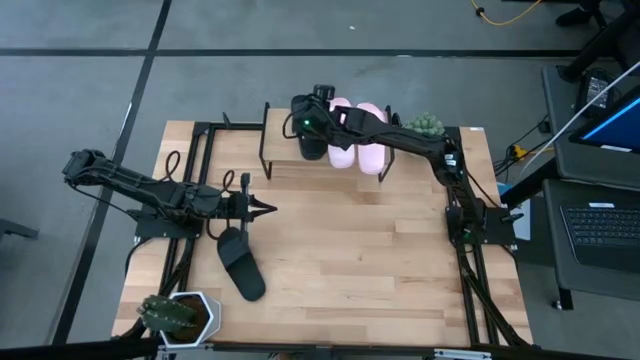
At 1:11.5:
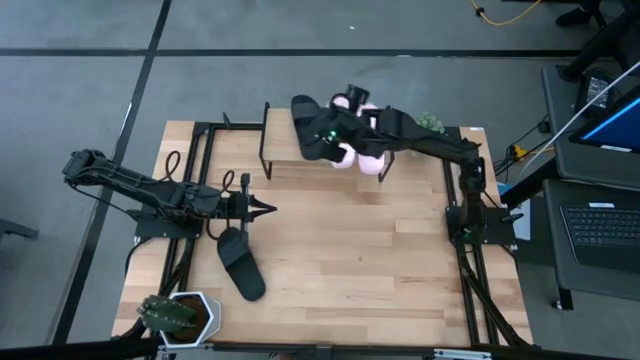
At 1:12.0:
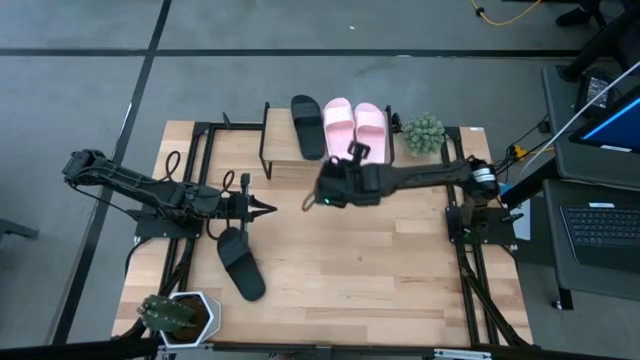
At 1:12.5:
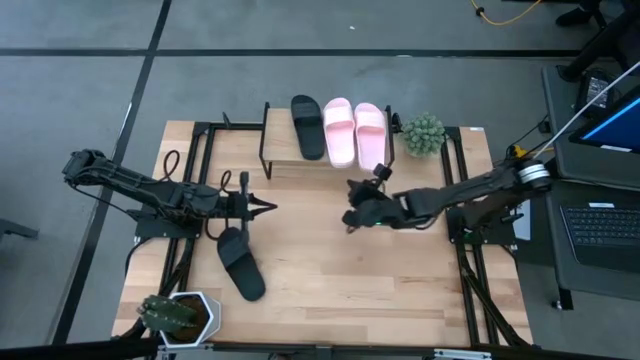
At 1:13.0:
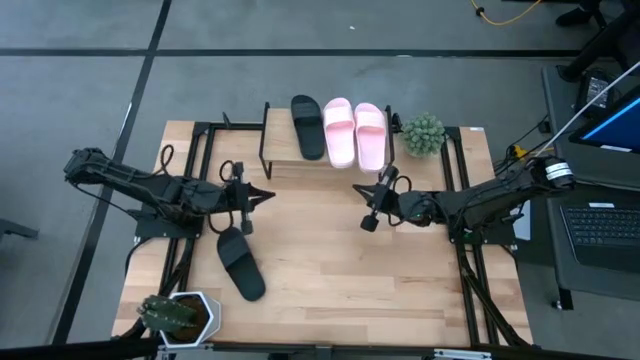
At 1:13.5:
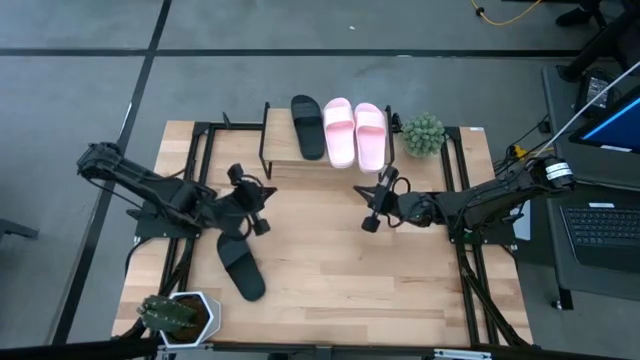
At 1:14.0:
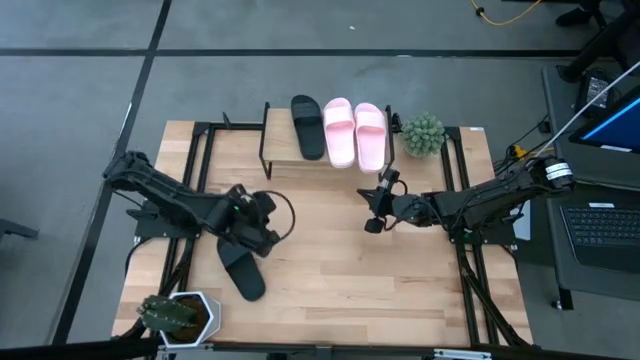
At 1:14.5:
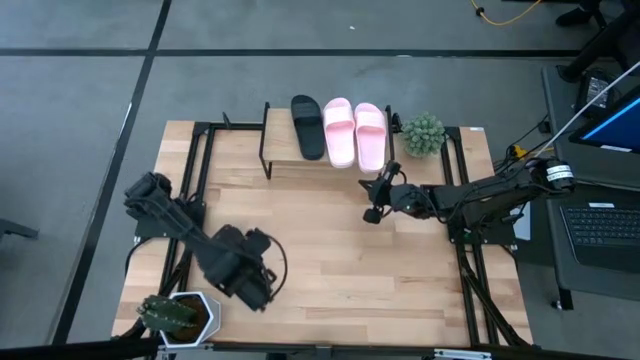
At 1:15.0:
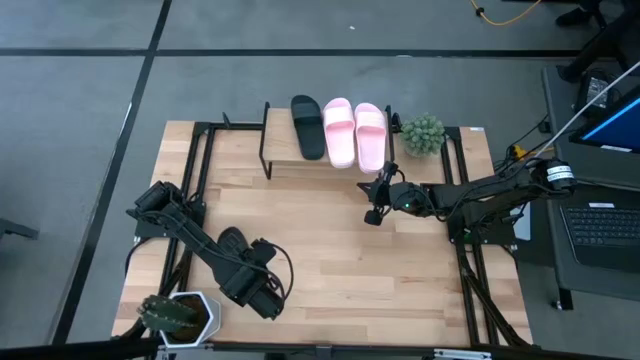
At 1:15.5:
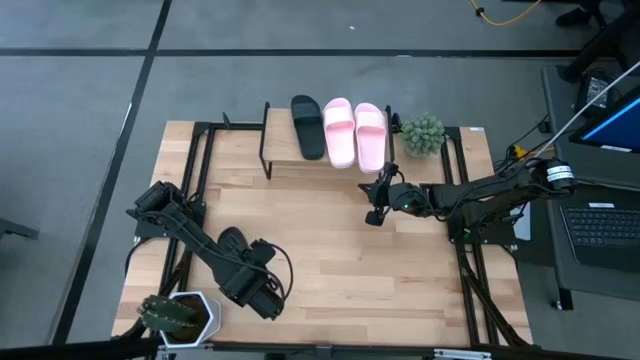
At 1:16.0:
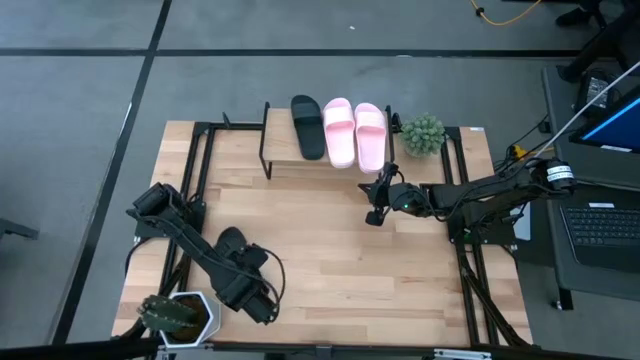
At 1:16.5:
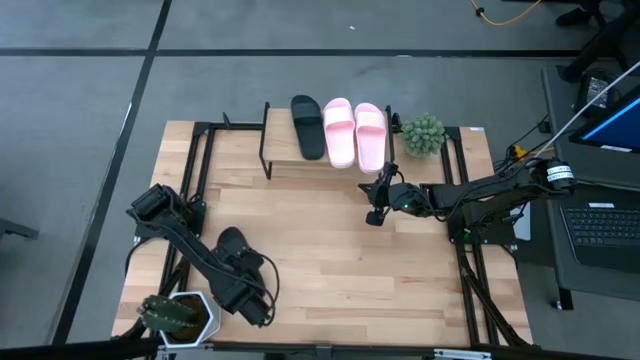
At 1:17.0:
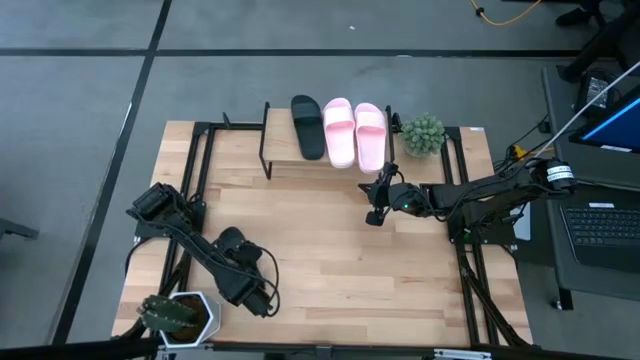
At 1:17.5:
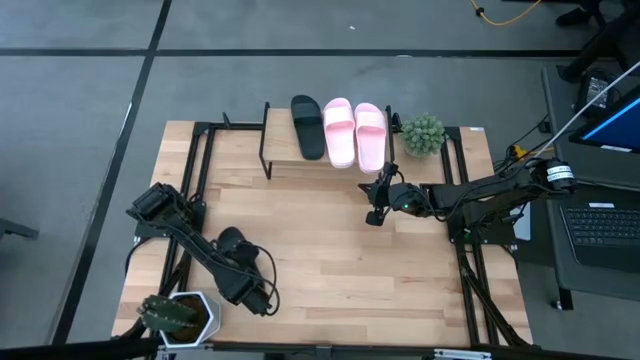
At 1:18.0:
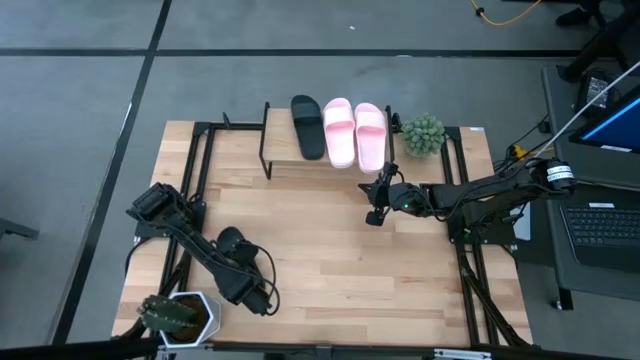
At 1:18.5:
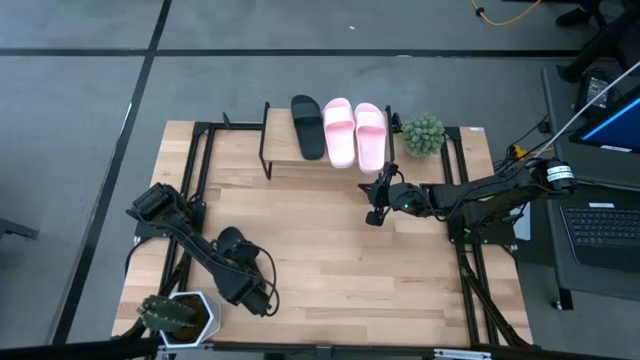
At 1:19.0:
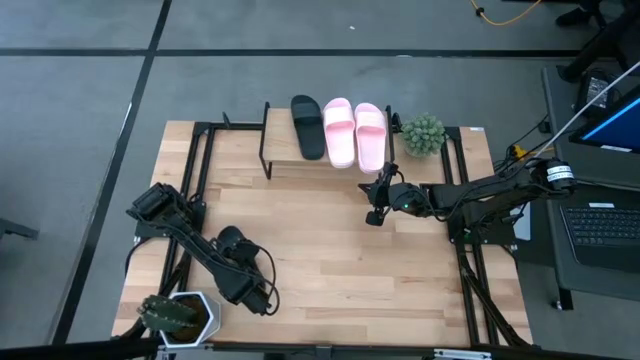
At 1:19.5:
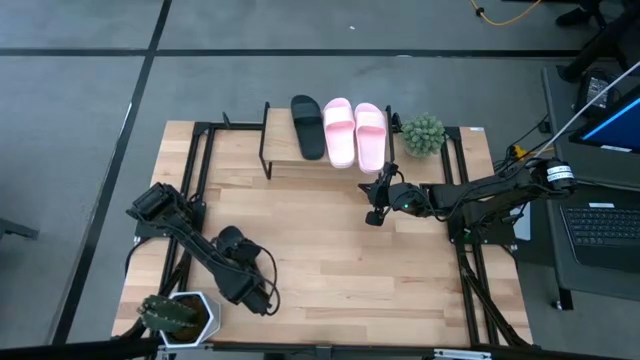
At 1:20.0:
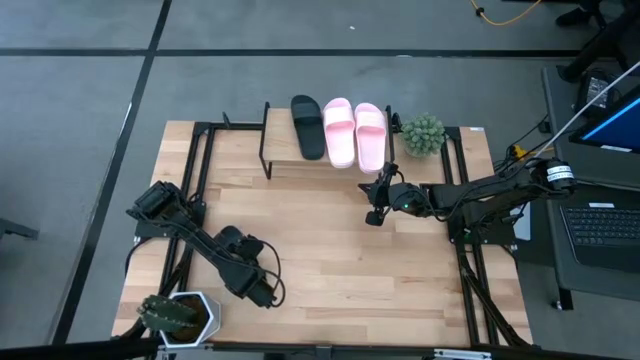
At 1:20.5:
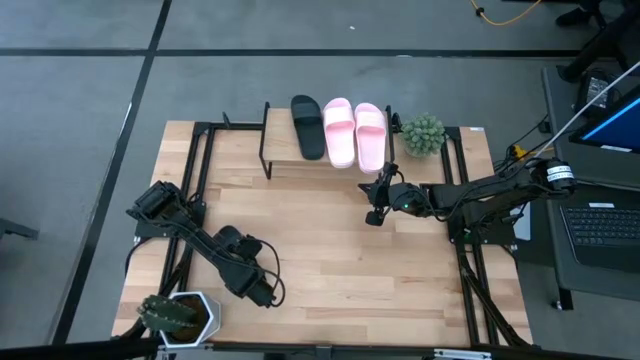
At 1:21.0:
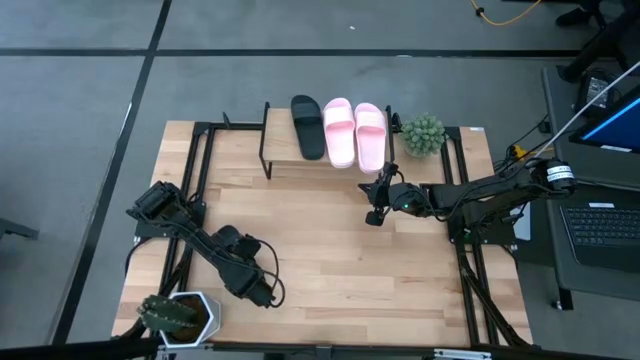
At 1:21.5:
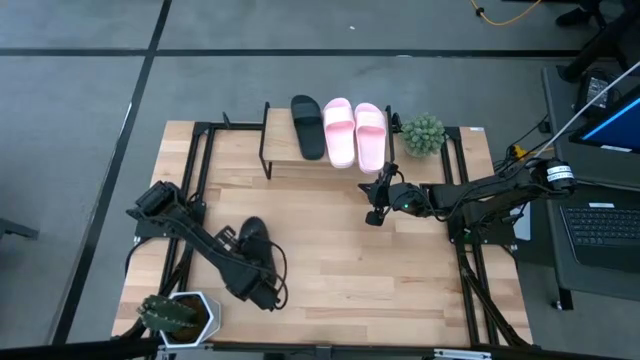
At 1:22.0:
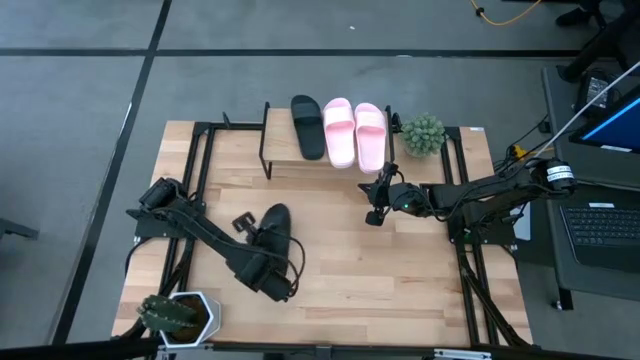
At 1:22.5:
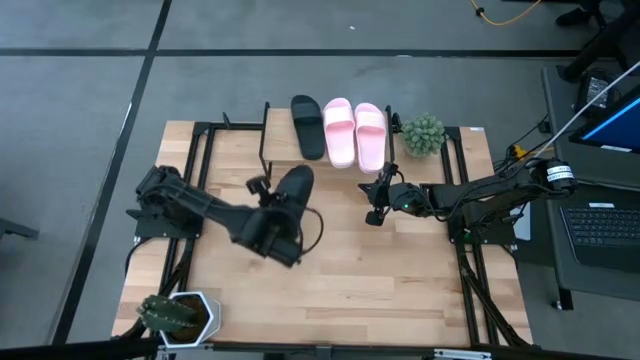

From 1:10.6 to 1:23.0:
Task: Pick and place slides into the shelf
Put the black slide on the shelf

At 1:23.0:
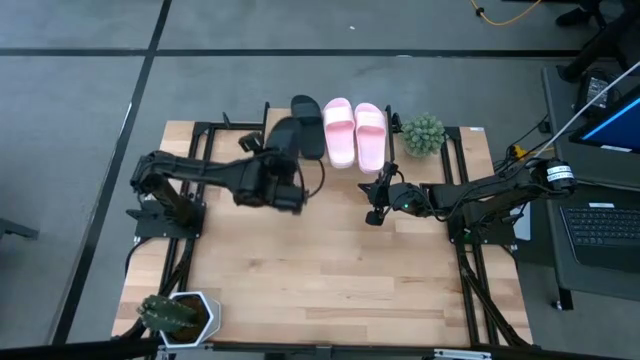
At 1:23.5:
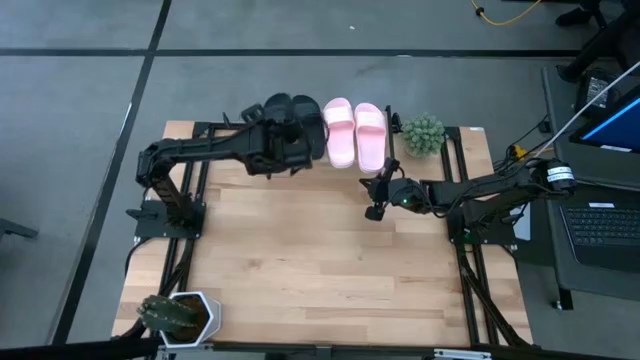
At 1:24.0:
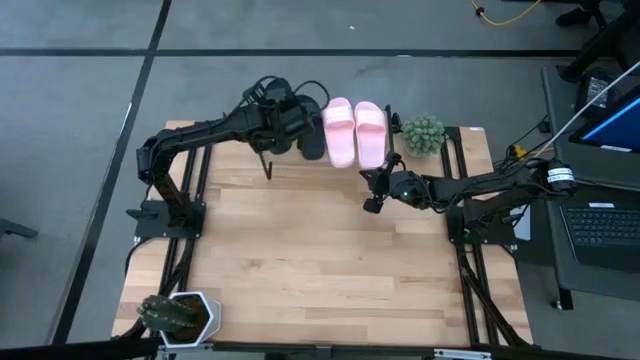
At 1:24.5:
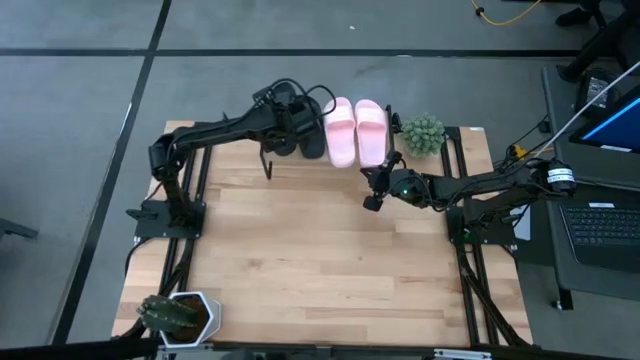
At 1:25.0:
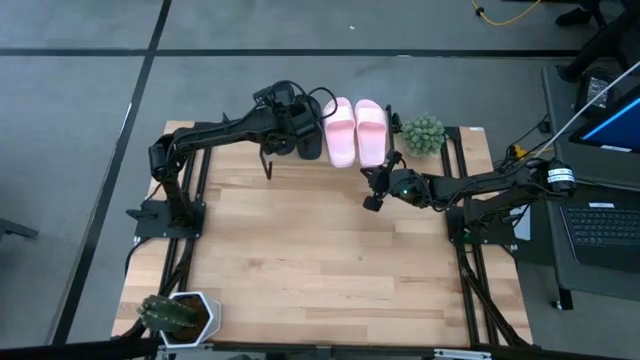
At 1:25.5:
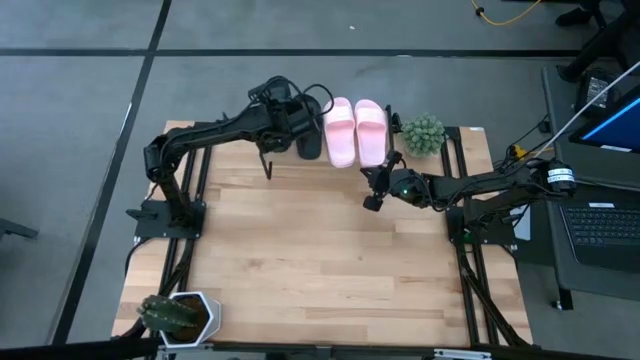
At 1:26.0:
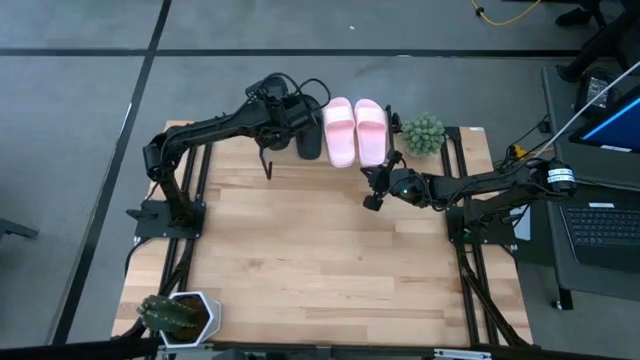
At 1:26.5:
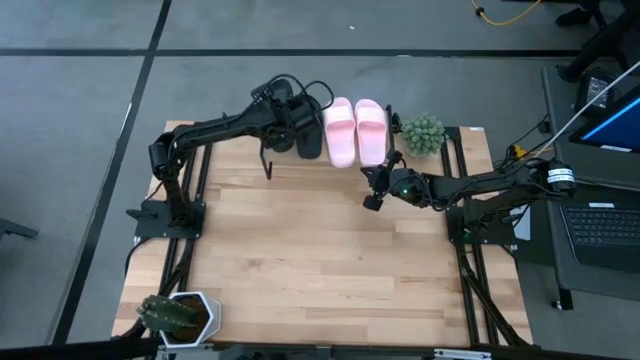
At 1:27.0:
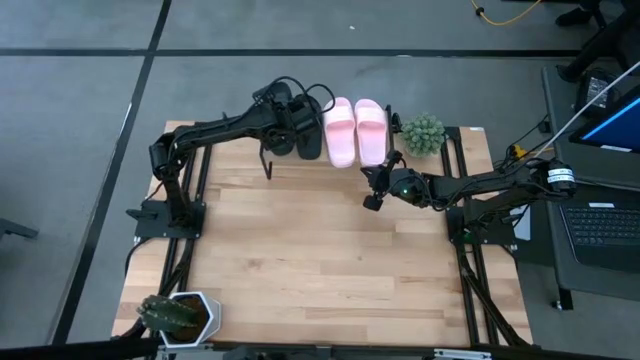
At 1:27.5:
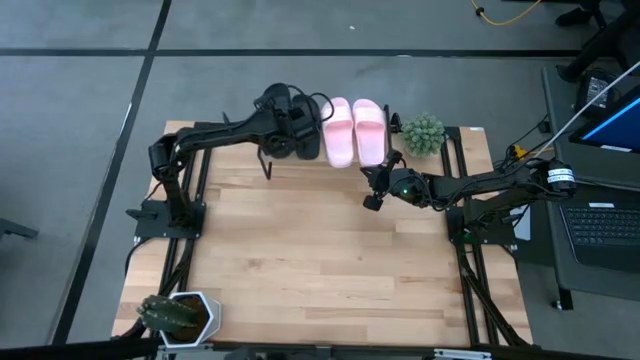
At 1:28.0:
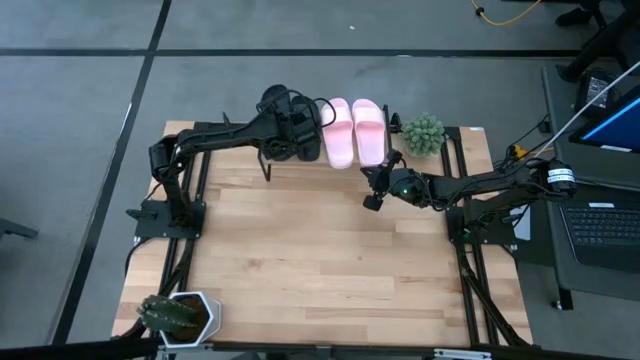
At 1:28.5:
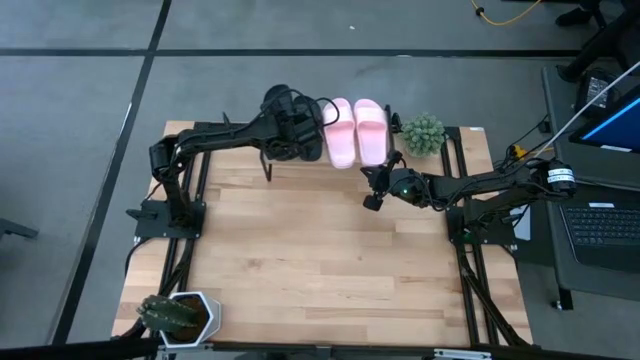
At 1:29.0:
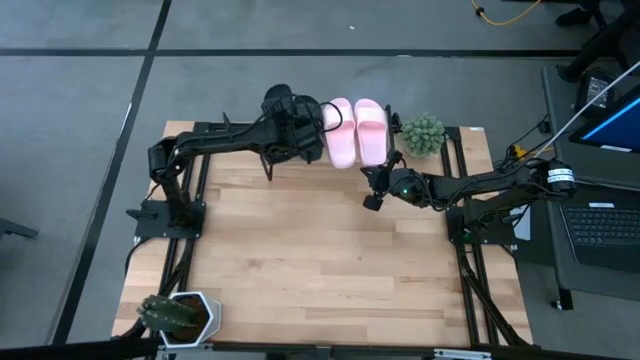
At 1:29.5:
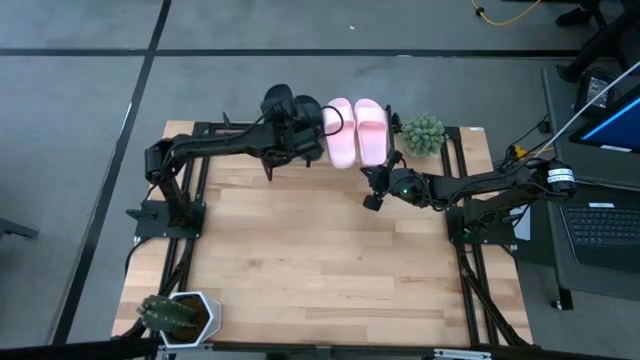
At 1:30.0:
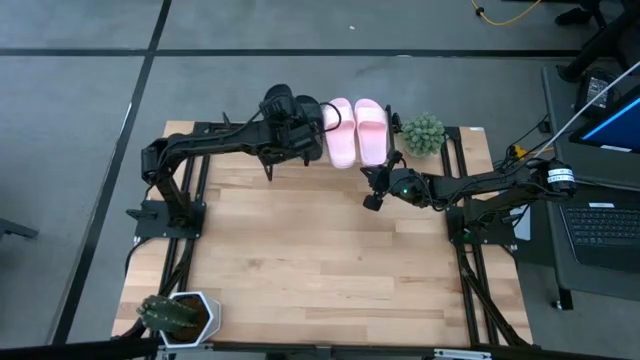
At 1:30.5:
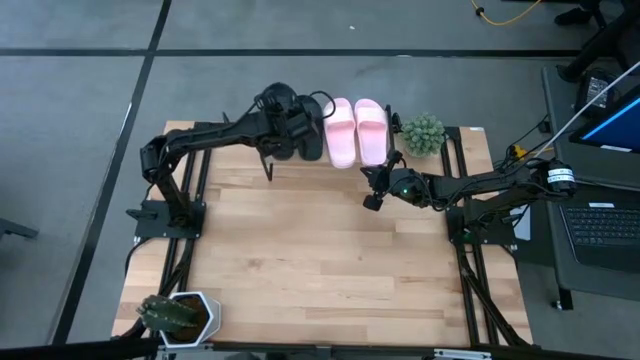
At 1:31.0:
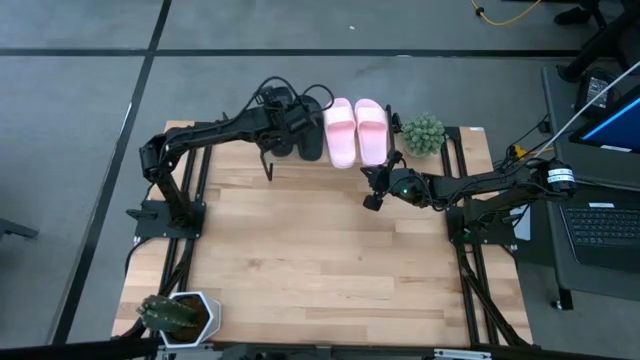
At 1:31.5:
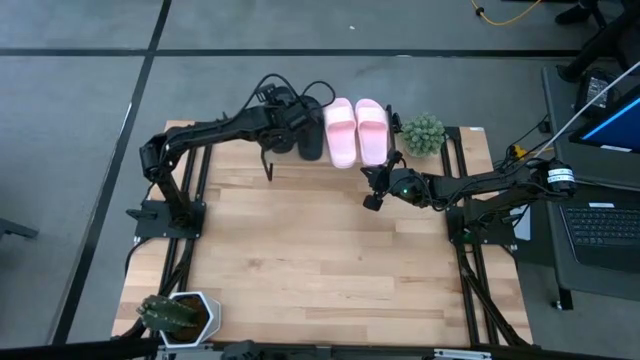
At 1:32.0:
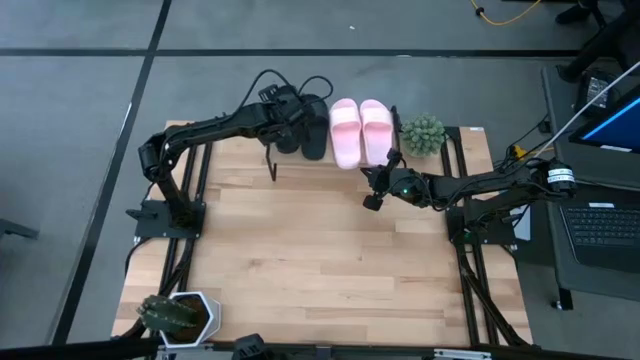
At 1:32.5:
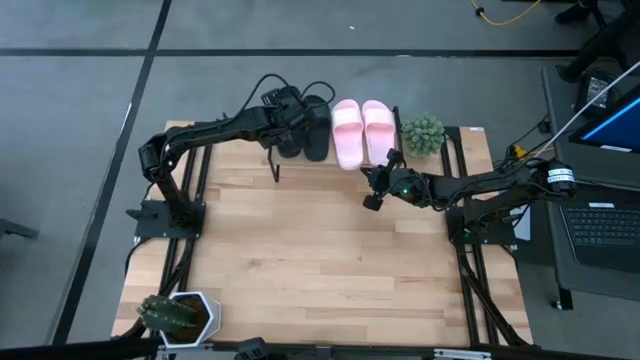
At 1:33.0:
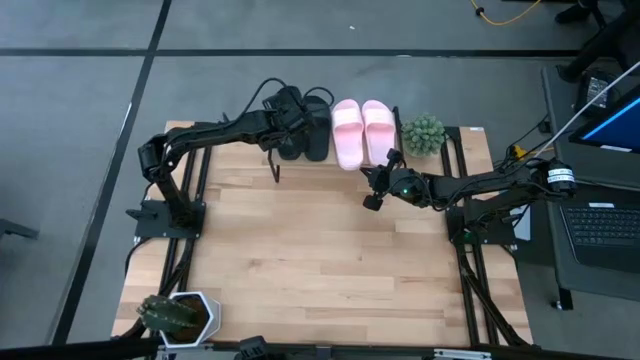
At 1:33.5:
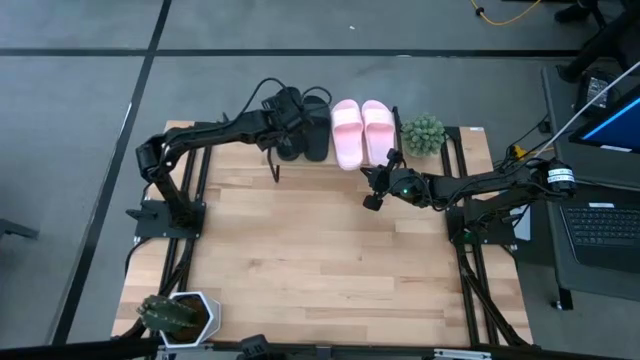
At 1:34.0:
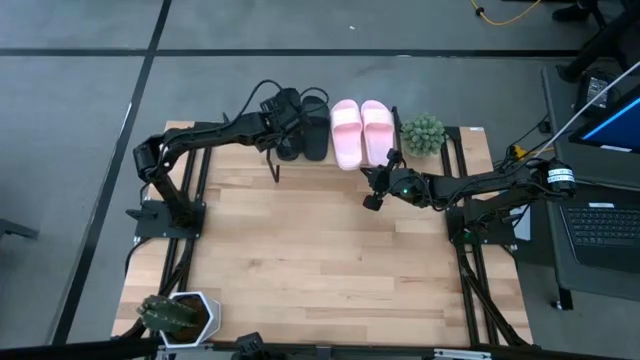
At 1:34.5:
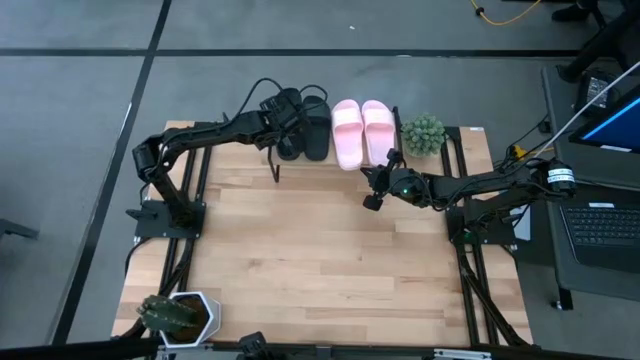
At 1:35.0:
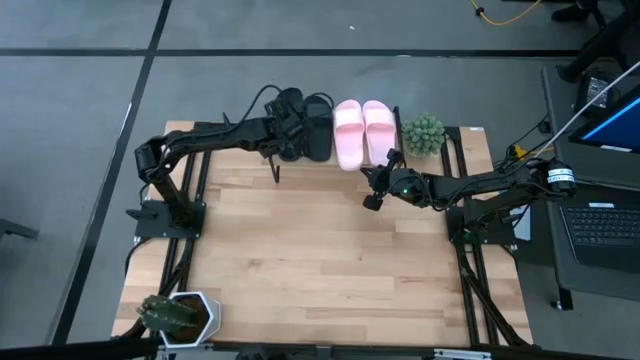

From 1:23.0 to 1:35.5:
Put the black slide on the shelf
